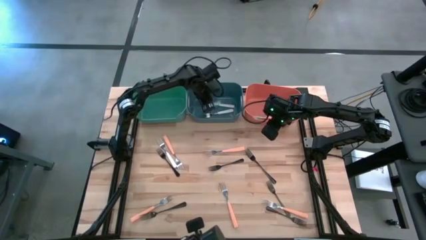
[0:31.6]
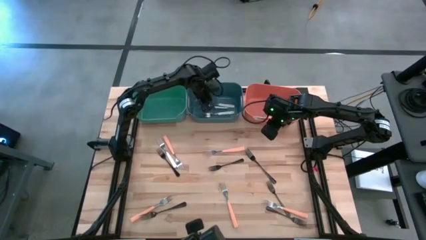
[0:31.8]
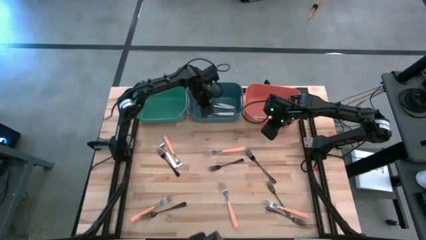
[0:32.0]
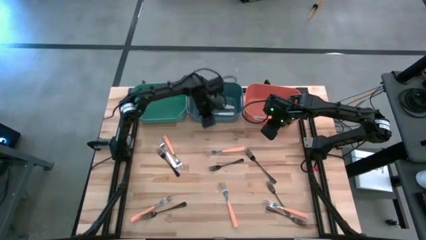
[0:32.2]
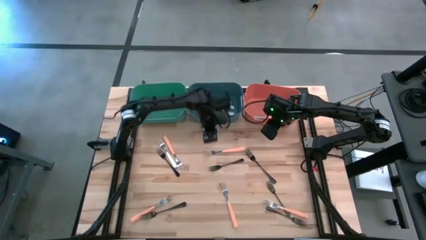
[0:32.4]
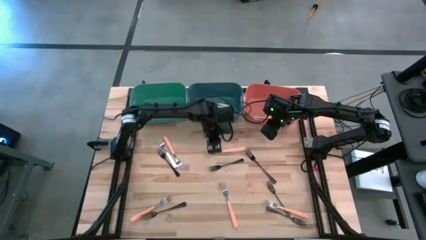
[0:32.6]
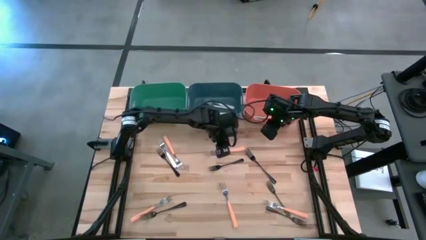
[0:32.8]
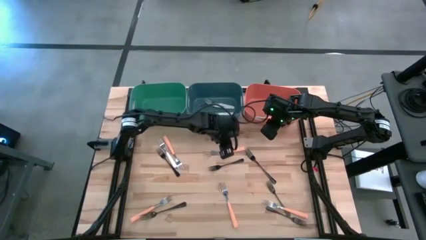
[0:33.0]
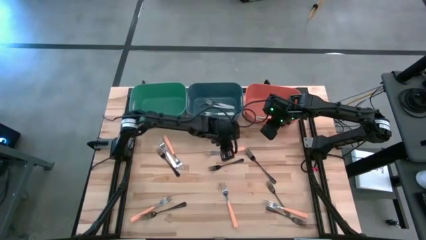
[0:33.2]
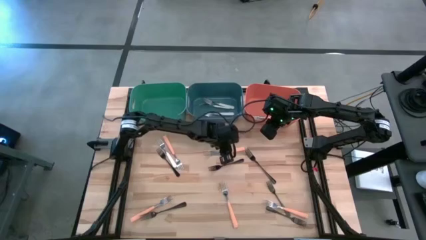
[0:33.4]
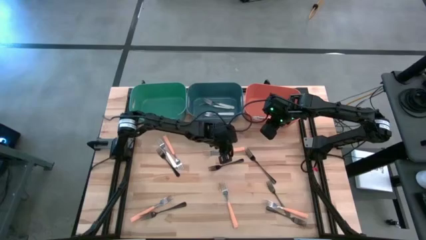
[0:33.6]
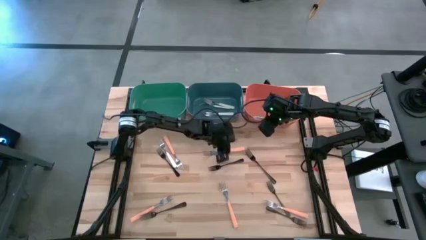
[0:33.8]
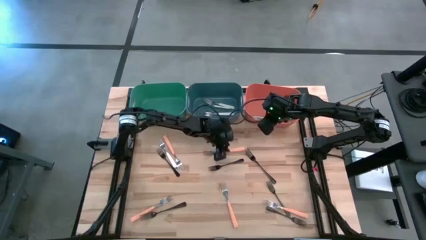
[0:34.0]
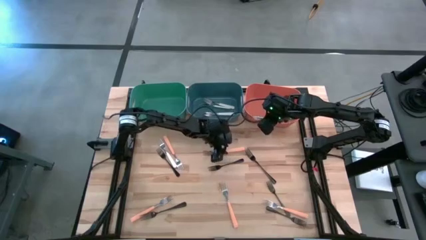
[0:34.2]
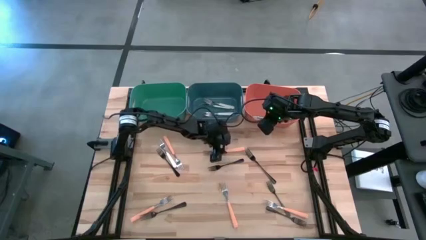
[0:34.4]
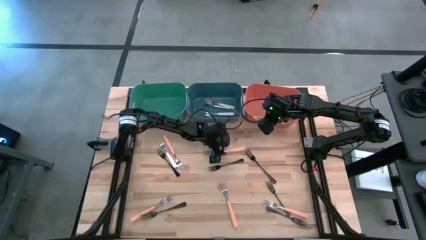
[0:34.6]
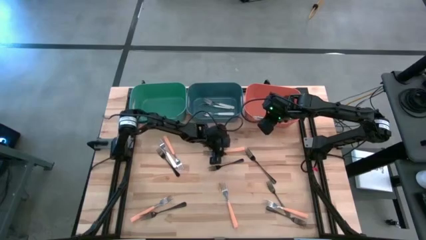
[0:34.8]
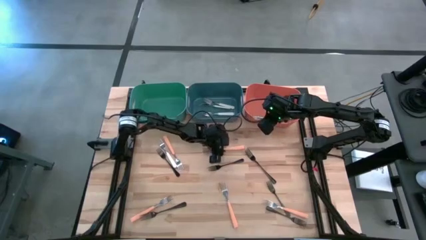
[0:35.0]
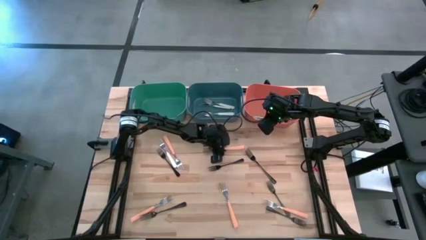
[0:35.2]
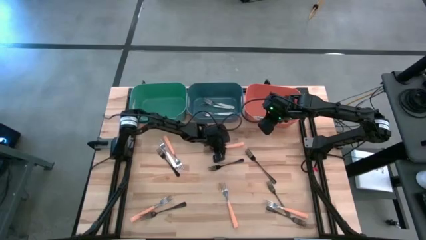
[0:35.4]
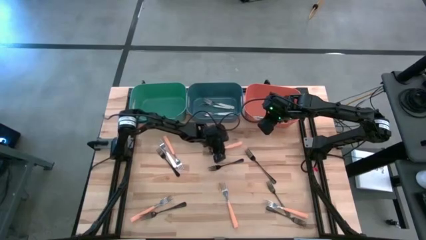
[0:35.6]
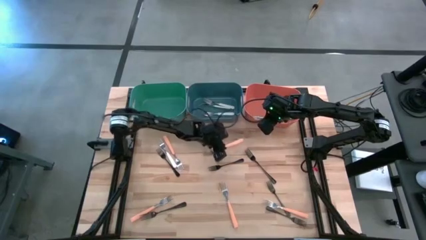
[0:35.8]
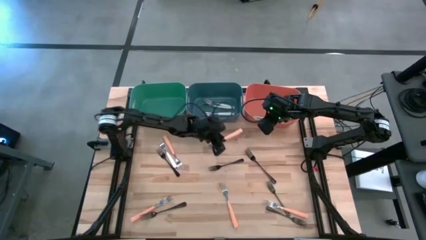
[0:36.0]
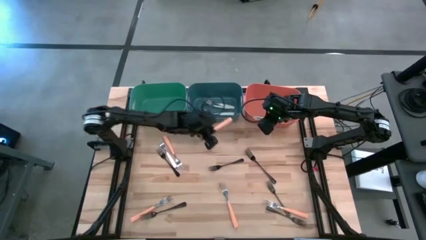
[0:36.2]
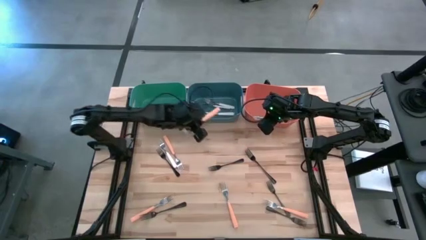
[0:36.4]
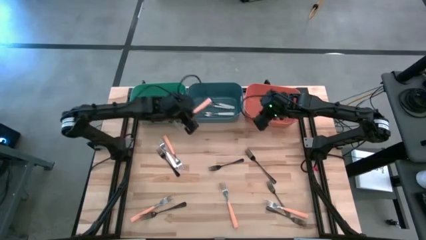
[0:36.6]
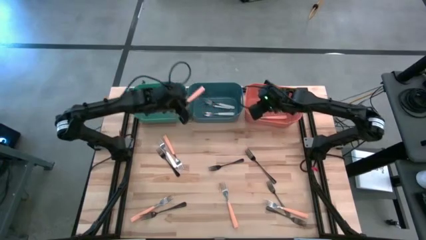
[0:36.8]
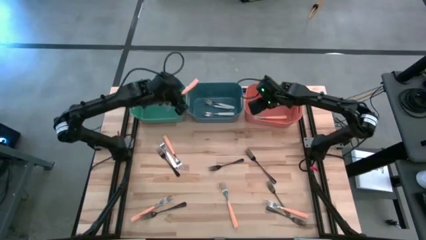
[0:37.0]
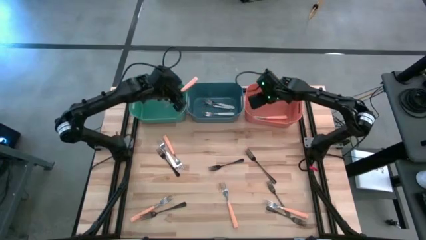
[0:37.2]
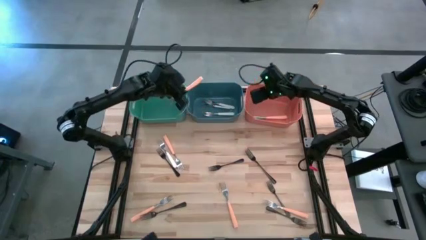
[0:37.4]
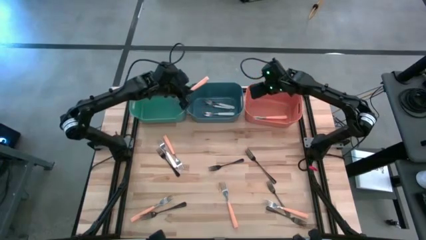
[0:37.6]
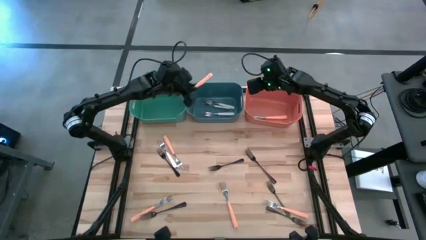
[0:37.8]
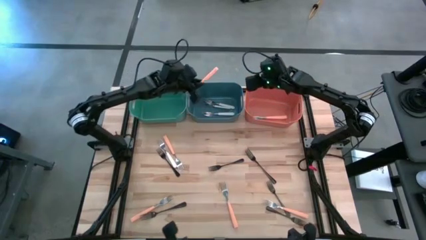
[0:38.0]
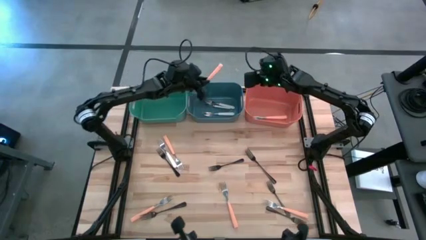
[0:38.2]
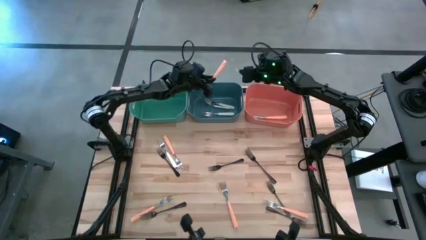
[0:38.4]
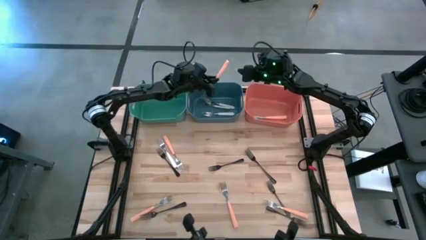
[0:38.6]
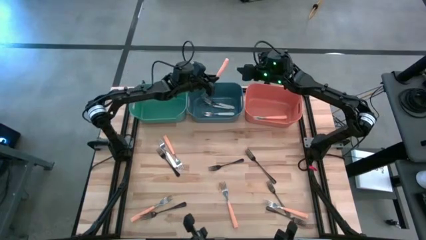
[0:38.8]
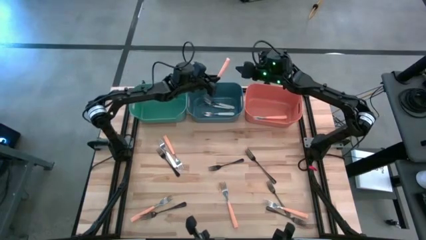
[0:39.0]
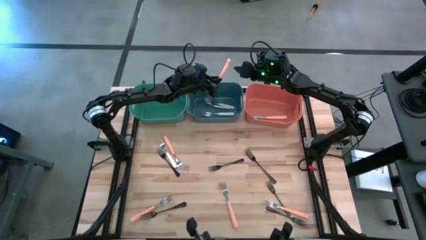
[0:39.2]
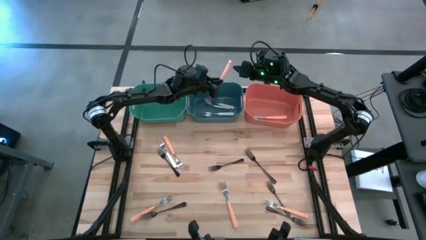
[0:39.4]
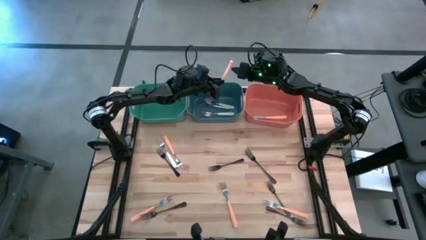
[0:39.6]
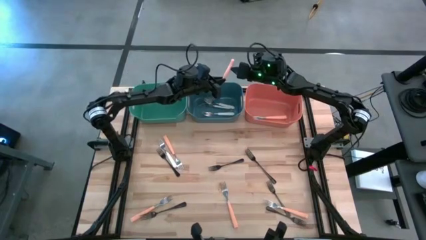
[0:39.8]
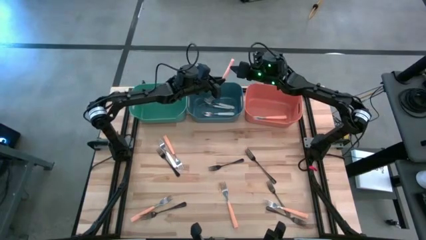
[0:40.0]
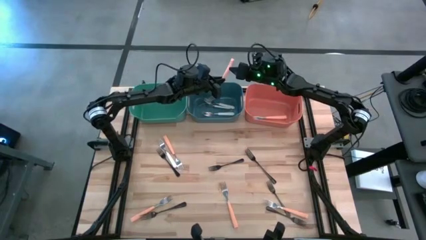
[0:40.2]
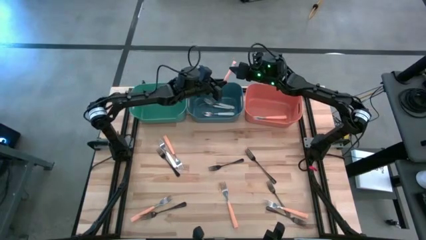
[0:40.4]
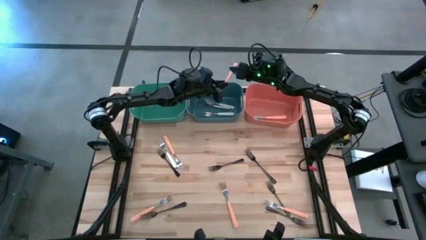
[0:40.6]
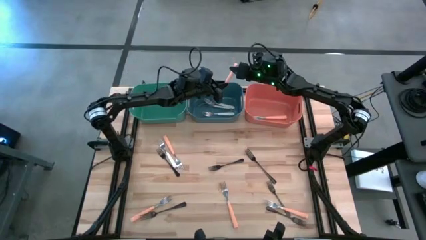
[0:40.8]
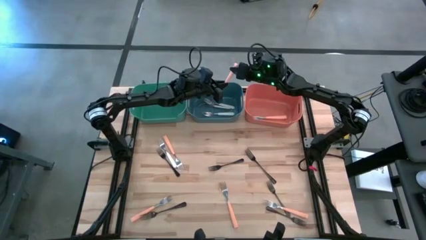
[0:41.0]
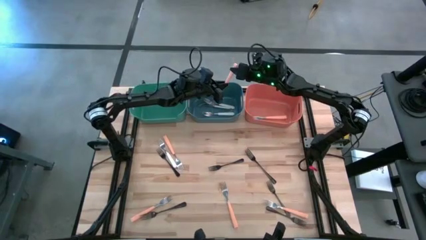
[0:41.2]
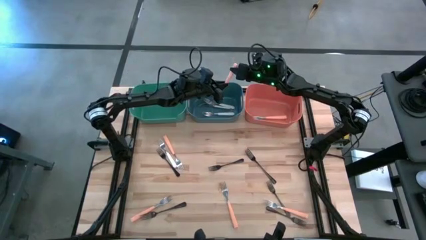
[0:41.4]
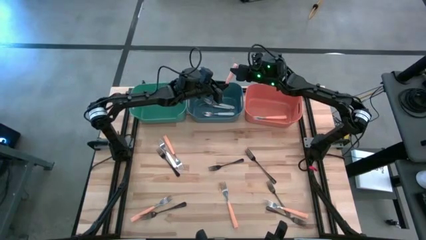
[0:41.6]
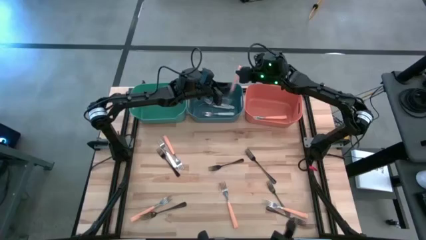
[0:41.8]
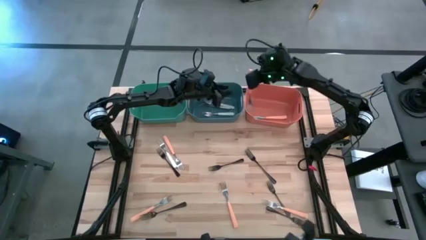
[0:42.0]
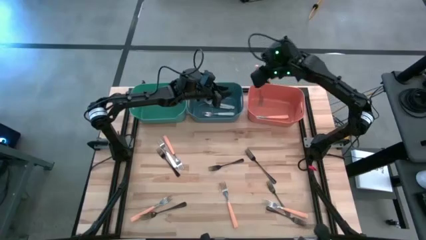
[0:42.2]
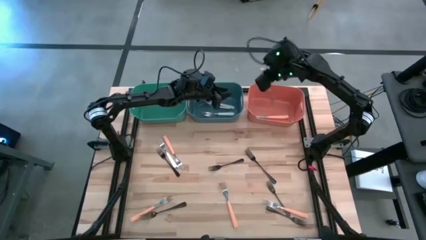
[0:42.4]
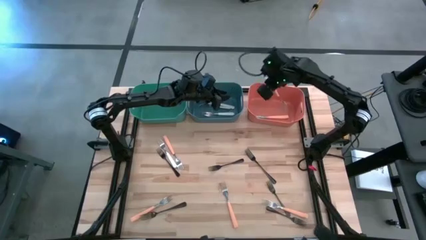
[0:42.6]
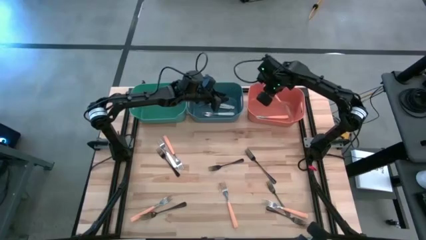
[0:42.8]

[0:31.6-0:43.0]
Task: Sort silverware by color (type)
Put the orange fork into the orange bin

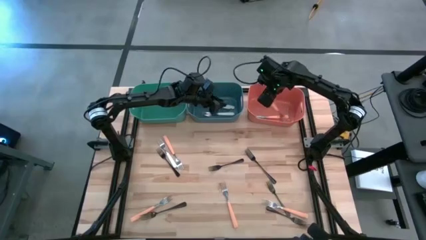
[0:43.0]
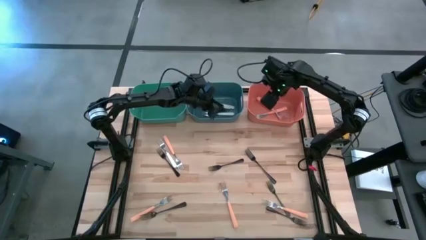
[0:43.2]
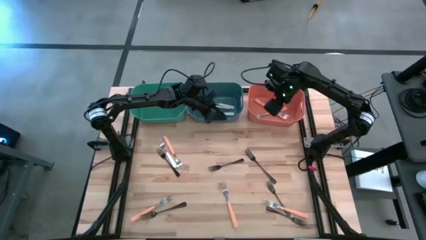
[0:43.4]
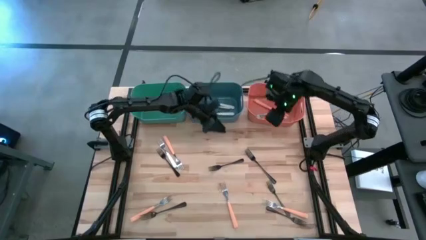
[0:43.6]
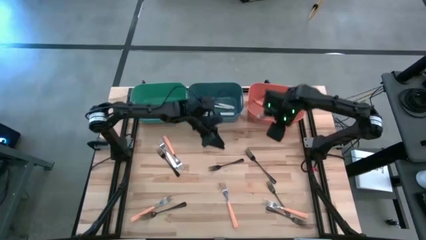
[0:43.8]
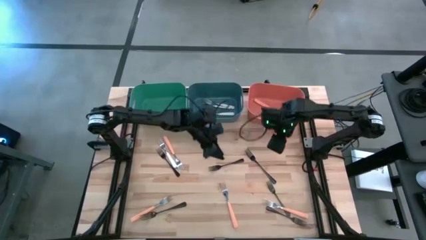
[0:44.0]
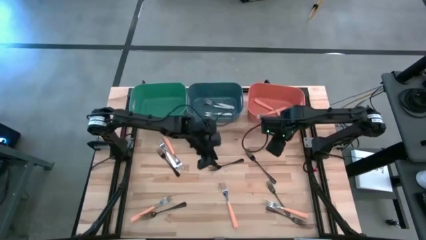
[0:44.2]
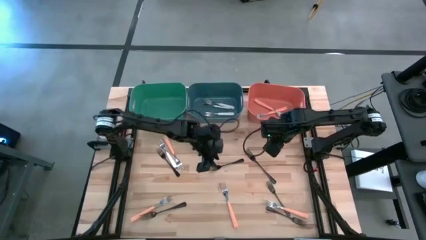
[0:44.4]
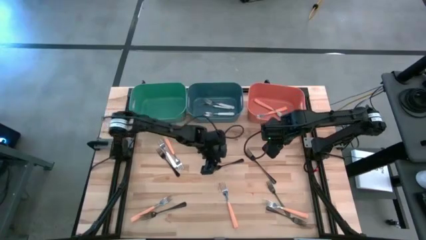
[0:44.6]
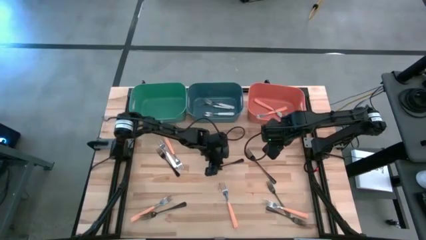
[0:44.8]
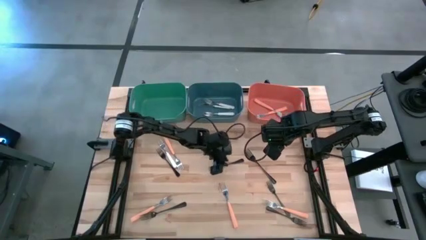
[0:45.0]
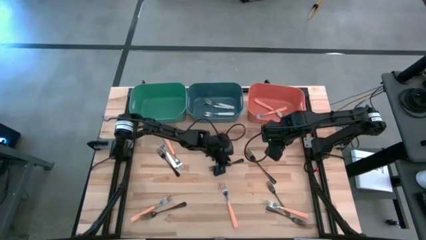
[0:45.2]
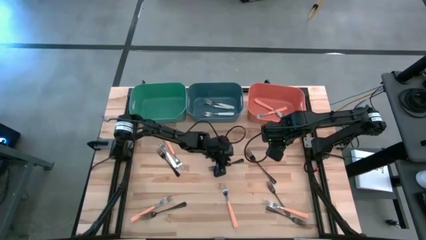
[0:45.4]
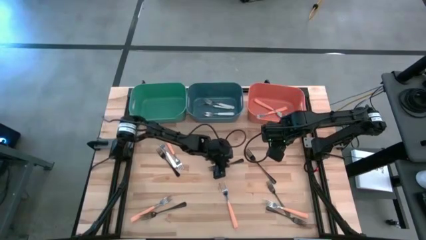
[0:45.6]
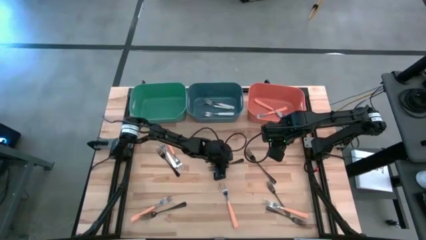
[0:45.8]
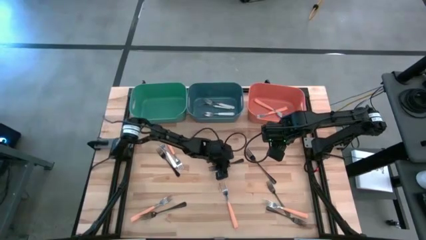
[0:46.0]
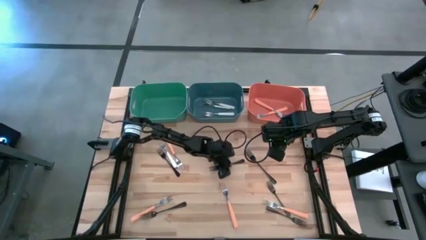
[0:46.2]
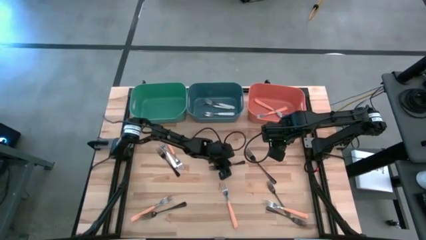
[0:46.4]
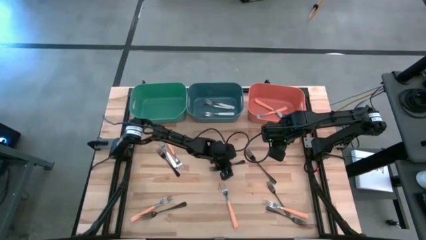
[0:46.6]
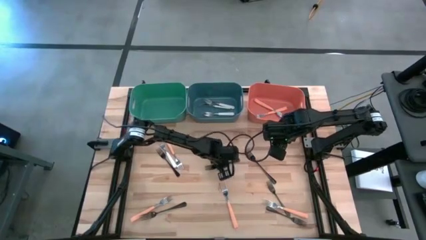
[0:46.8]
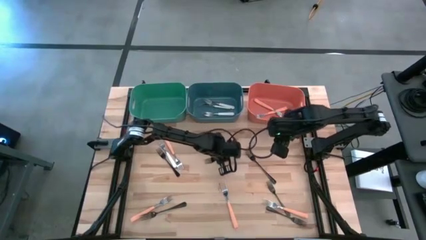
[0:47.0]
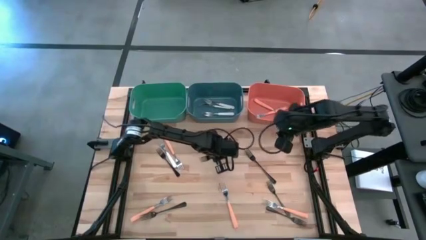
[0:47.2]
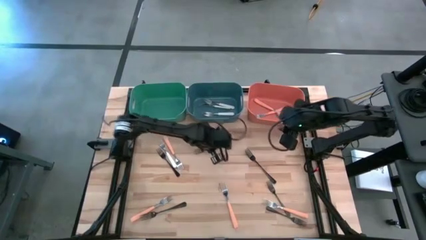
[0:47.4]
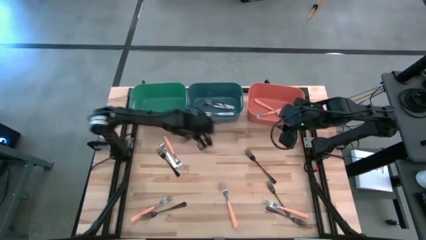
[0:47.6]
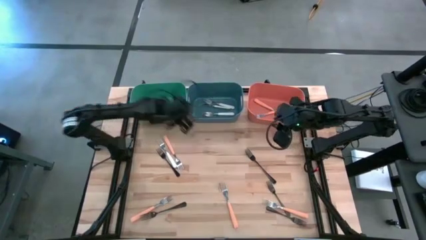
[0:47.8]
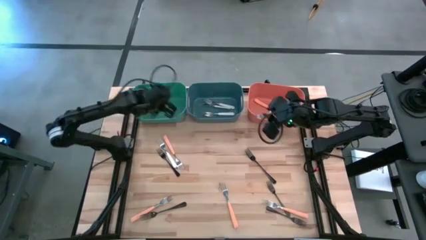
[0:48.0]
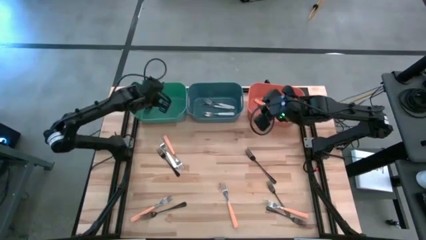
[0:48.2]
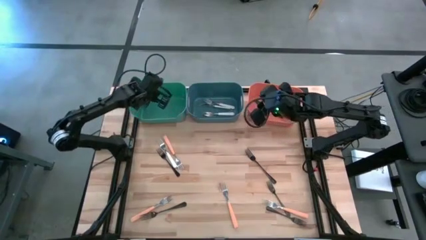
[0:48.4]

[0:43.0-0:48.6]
Put the black fork into the green bin
